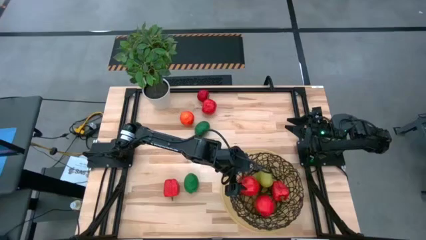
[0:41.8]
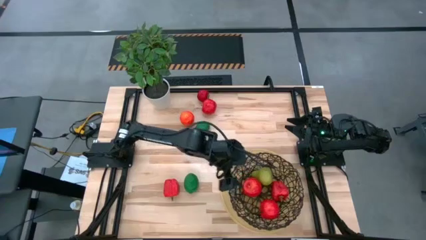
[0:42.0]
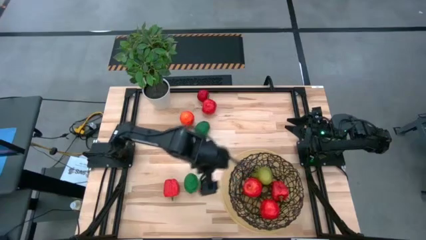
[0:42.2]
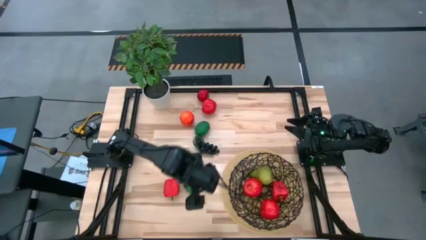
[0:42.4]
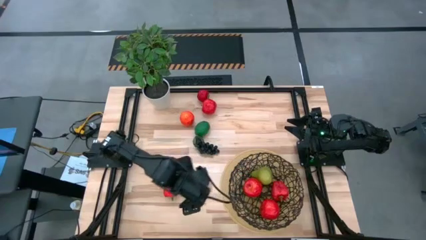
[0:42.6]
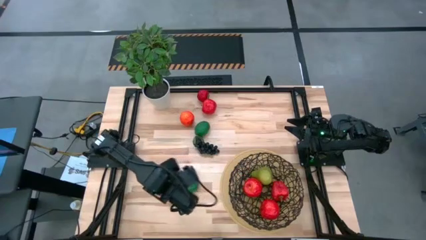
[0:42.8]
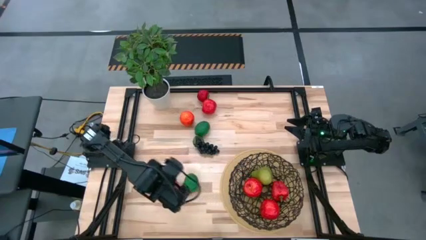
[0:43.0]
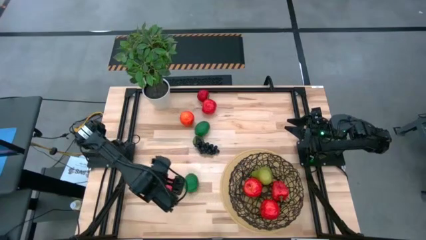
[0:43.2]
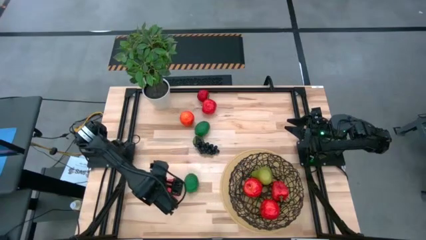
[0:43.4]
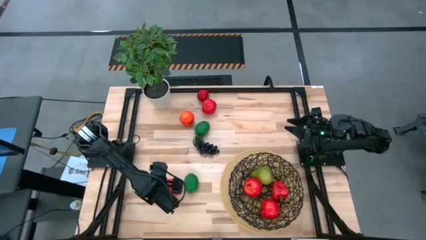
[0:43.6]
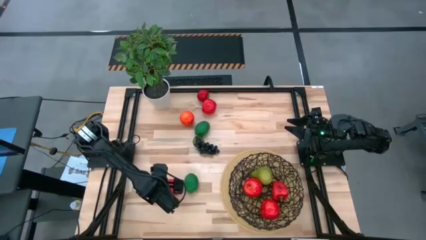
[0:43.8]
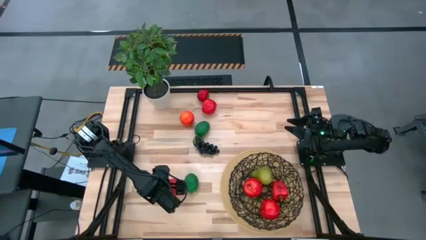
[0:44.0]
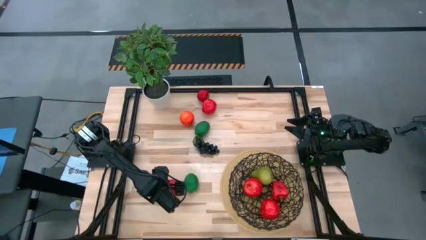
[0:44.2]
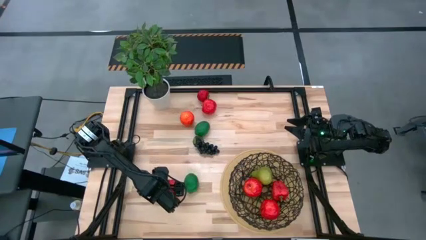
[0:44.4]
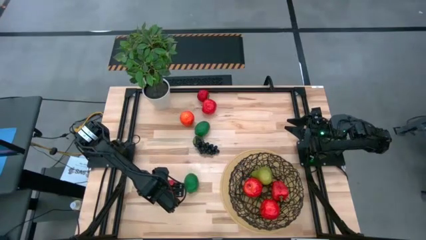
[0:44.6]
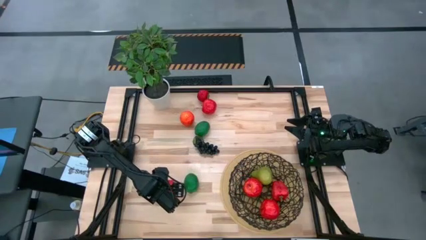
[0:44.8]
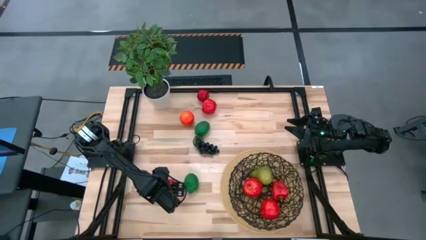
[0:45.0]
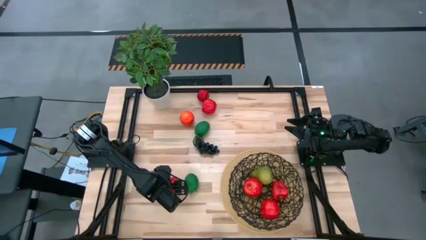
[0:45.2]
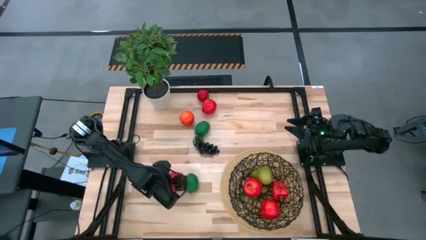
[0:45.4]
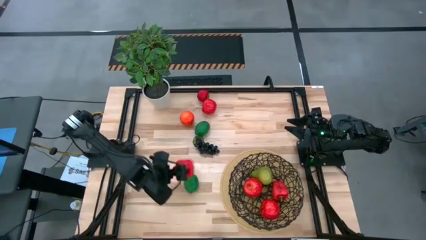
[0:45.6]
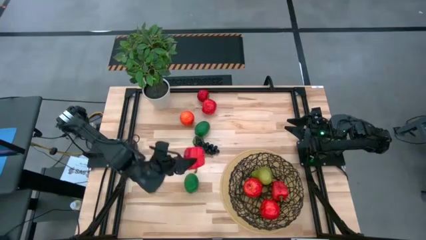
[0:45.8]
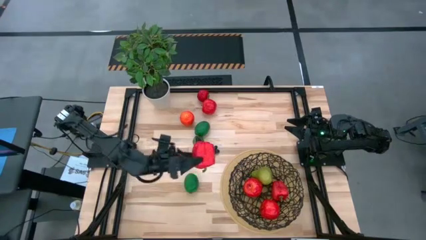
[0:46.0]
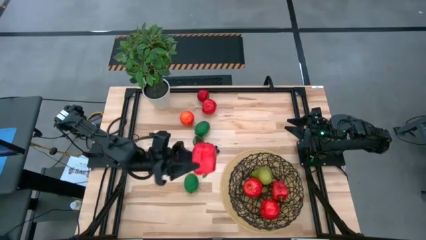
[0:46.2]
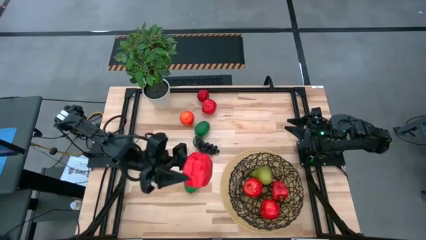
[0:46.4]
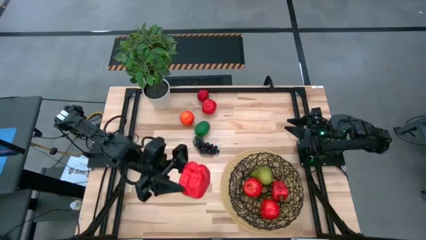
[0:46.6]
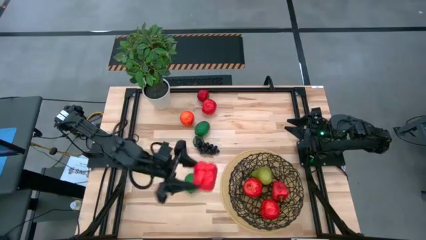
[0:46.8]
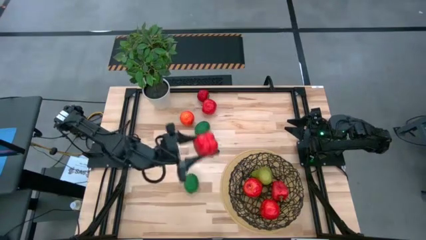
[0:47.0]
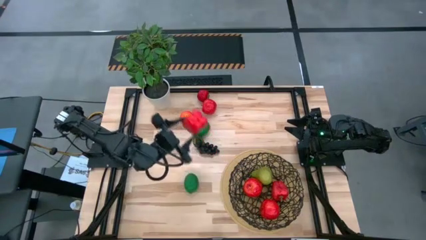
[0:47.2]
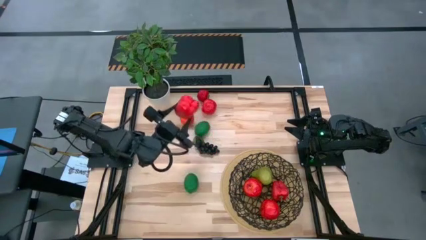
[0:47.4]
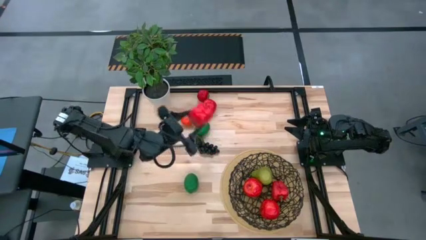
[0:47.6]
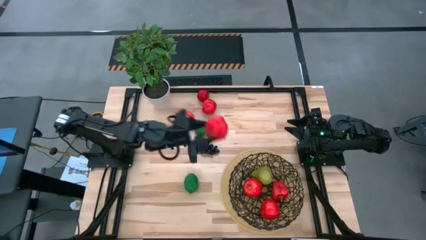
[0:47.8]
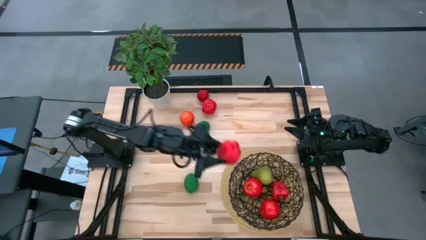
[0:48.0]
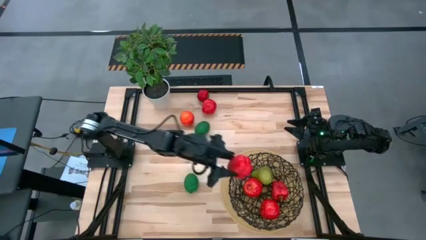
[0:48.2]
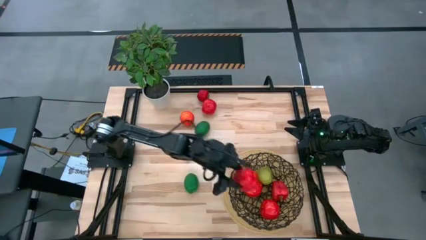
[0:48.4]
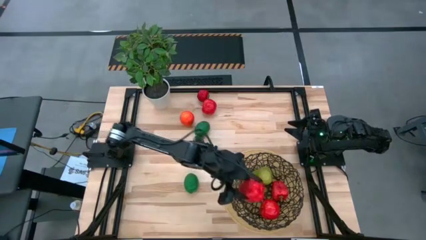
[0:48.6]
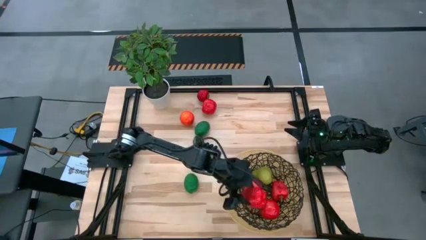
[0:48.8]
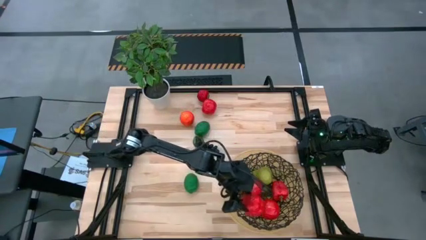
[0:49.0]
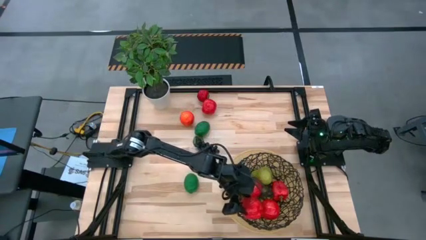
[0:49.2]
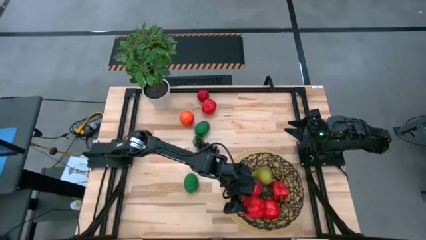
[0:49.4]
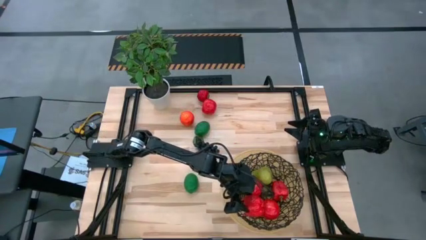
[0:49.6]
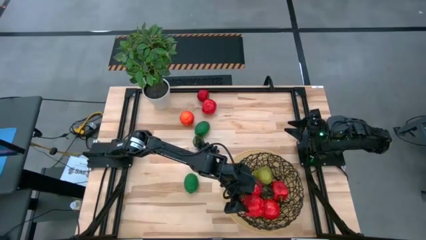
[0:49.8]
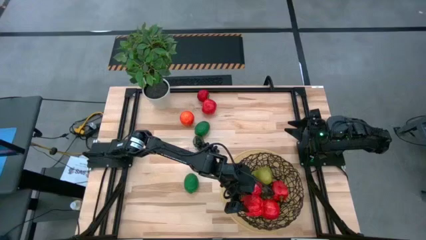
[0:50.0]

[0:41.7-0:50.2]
Task: Build produce basket
Put the red bell pepper into the black wire basket

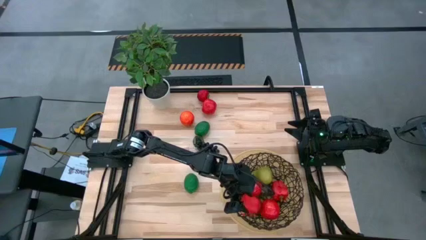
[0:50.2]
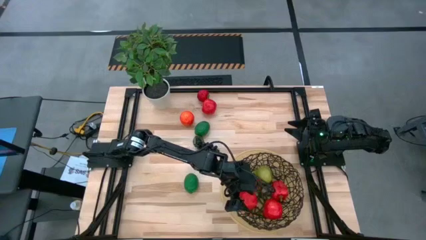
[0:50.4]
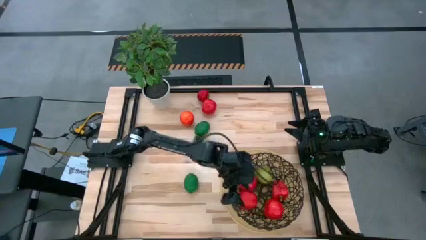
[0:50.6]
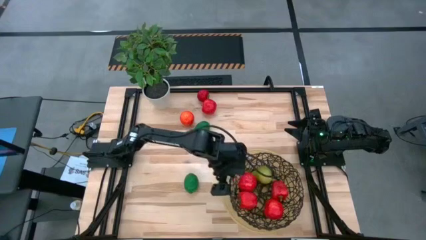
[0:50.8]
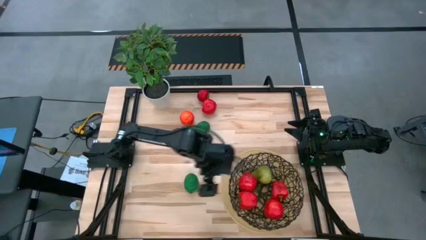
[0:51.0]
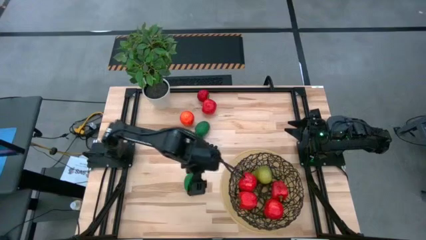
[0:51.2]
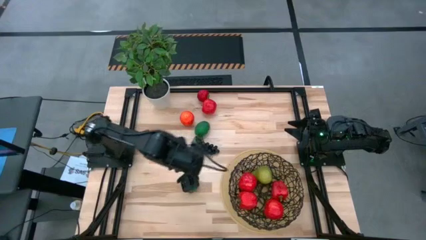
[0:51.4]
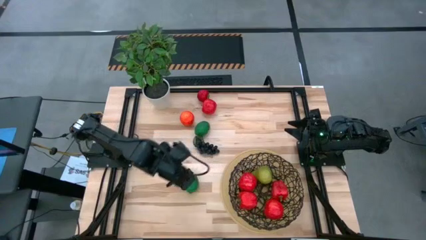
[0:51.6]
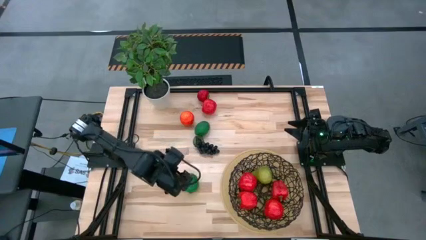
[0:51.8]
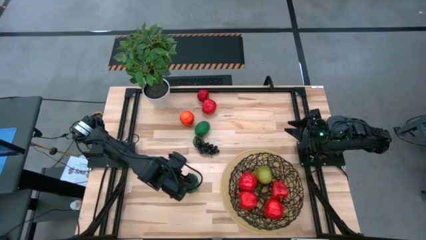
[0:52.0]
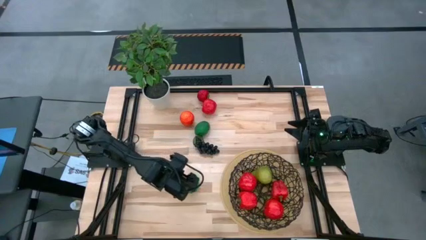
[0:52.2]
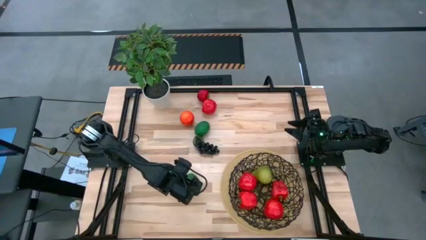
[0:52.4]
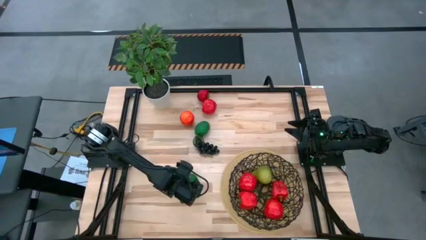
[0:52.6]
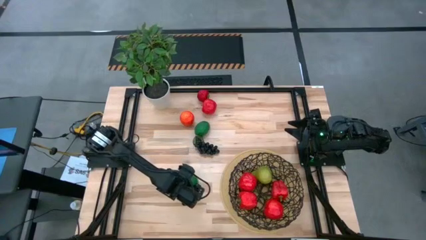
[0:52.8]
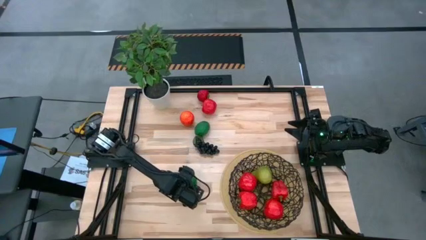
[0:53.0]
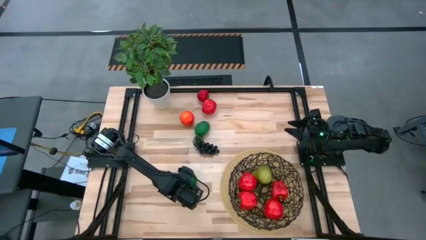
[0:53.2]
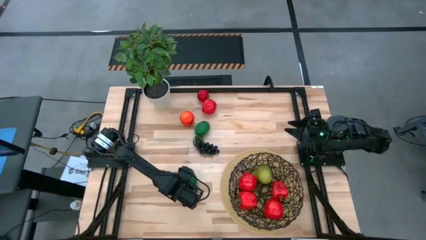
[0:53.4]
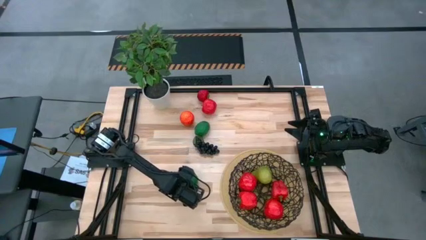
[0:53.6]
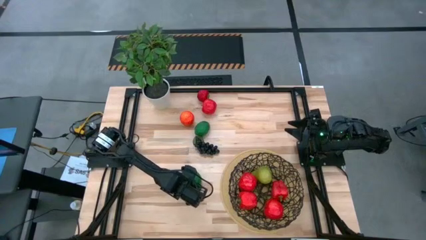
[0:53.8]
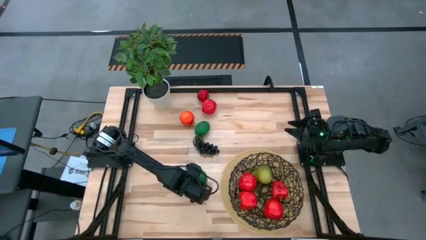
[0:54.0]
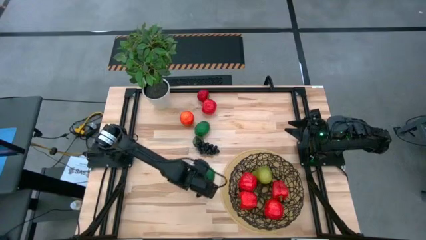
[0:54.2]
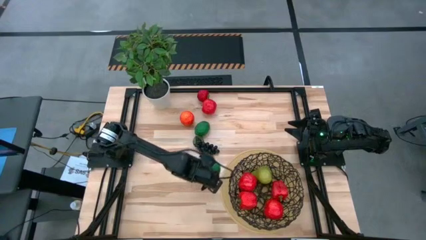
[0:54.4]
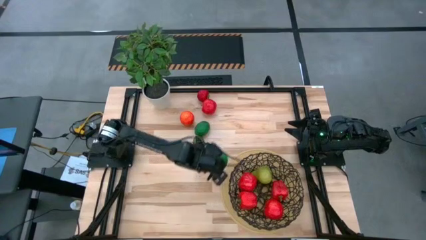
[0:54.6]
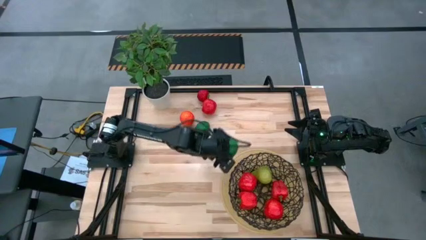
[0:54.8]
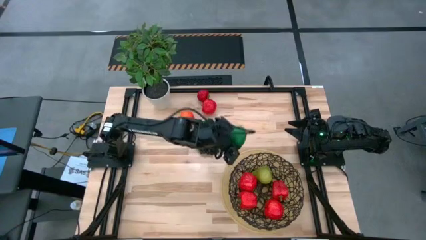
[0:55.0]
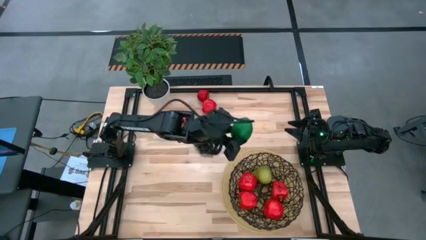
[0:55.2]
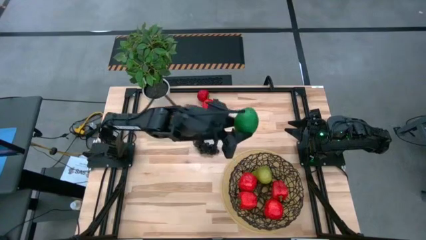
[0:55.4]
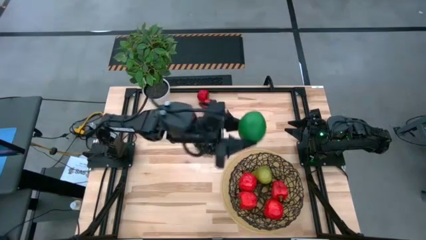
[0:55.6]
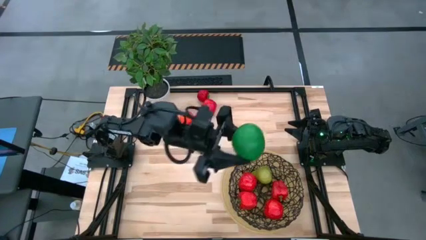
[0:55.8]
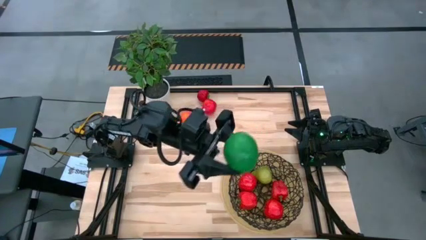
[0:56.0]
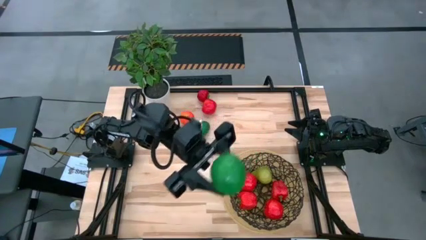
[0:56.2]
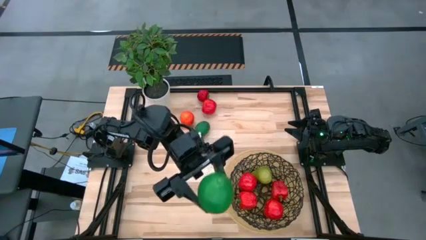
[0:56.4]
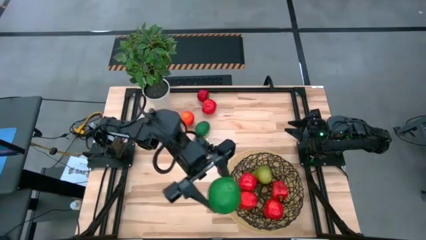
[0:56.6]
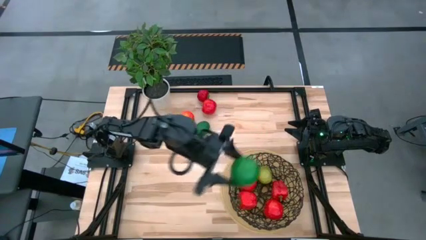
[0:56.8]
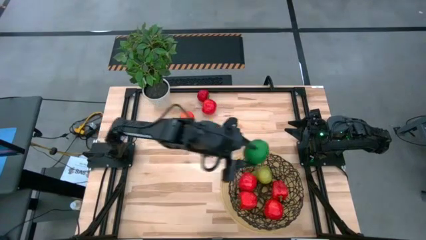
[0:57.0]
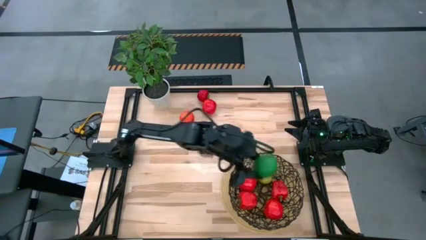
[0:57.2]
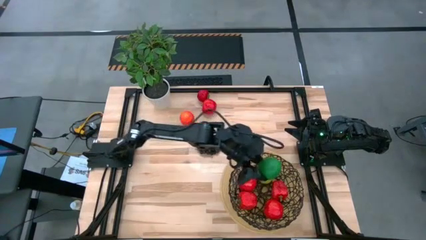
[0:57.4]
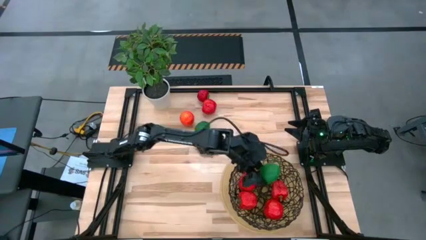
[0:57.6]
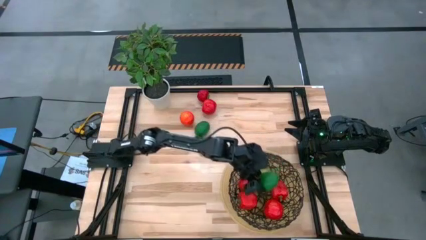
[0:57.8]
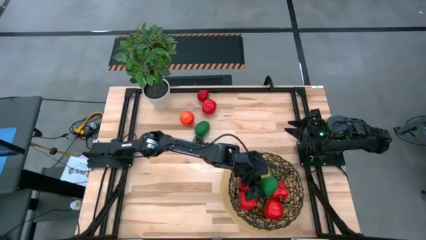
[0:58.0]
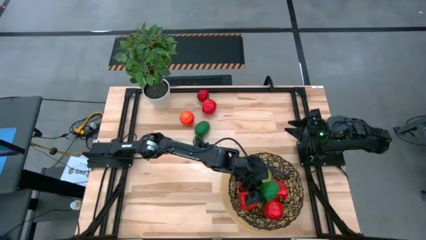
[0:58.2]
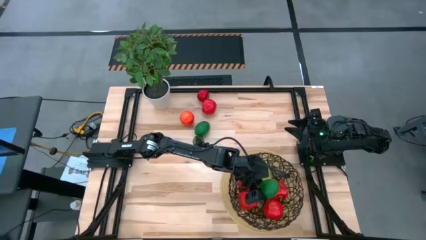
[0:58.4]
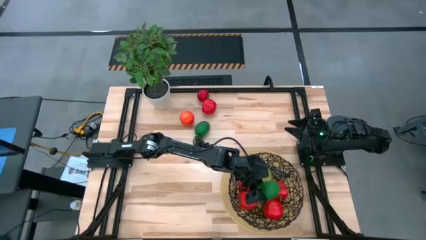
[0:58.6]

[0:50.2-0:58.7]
Put the bottom green lime into the black wire basket
